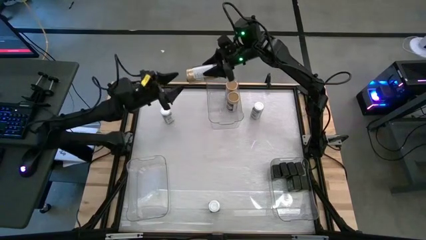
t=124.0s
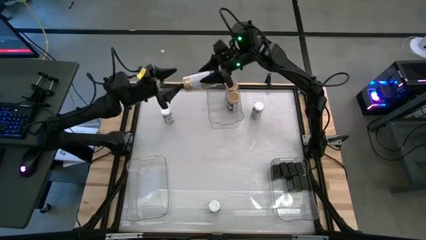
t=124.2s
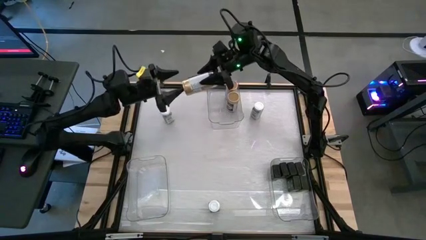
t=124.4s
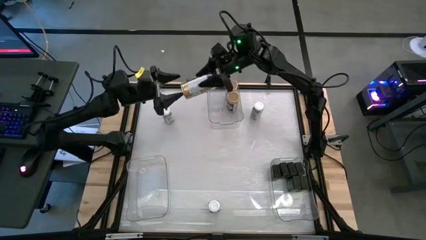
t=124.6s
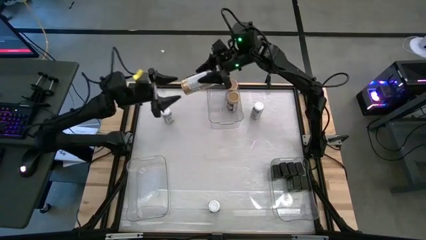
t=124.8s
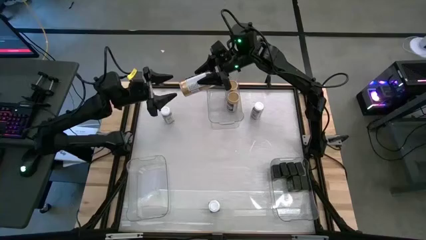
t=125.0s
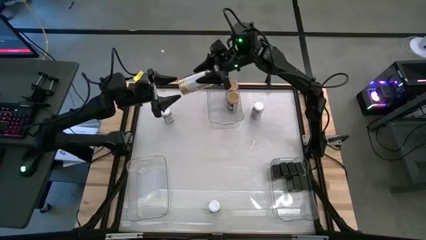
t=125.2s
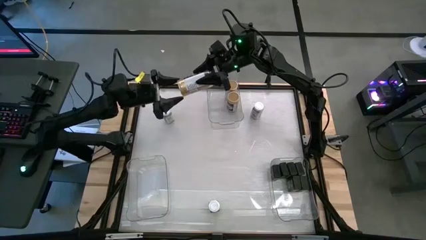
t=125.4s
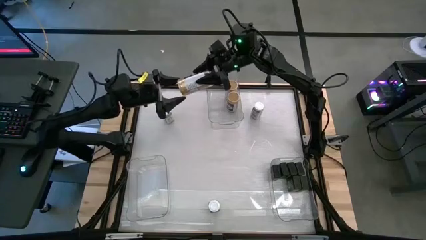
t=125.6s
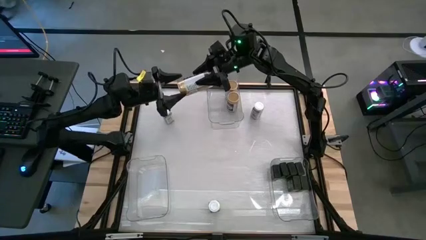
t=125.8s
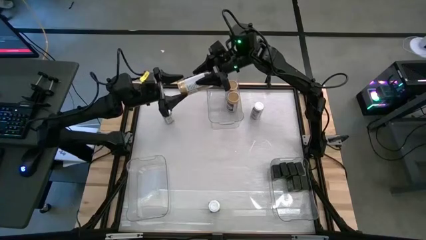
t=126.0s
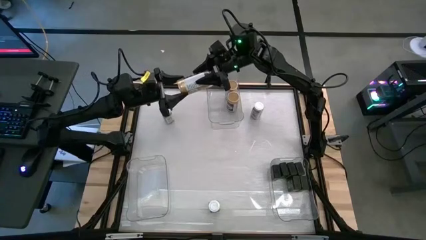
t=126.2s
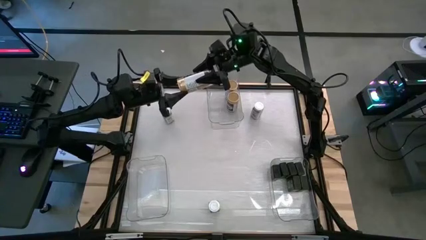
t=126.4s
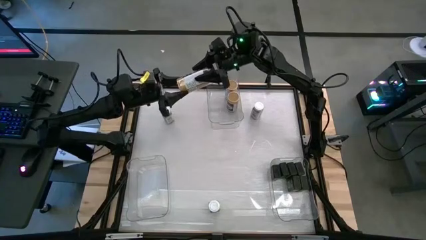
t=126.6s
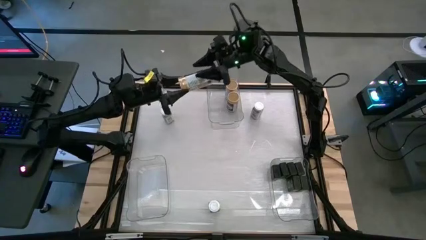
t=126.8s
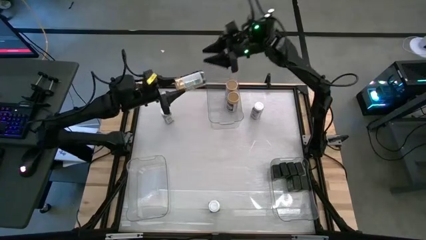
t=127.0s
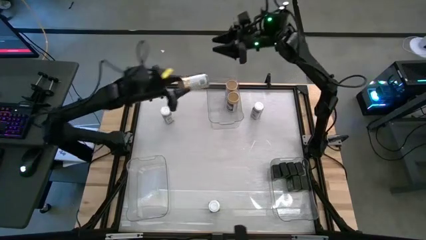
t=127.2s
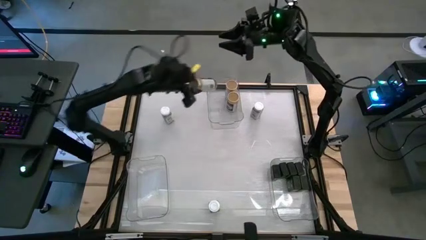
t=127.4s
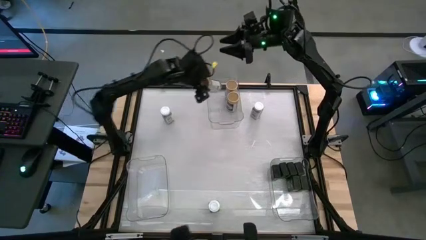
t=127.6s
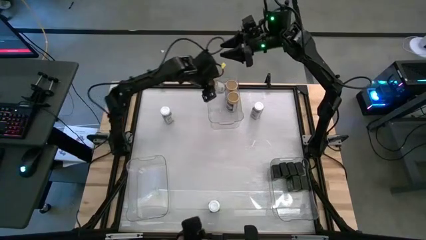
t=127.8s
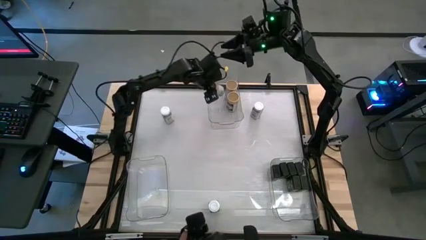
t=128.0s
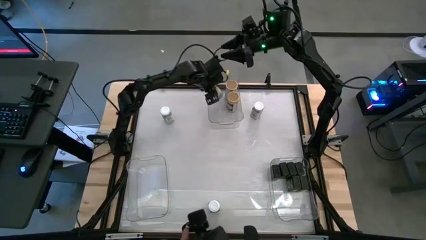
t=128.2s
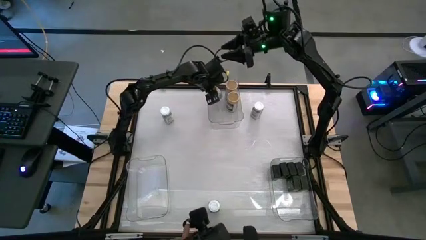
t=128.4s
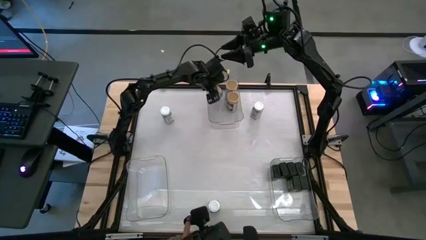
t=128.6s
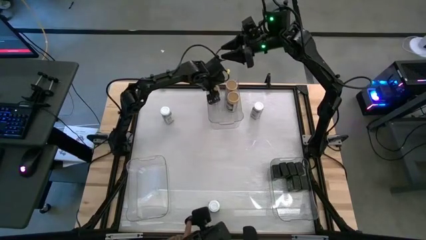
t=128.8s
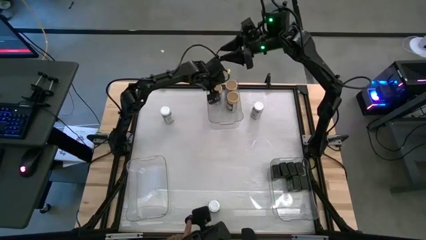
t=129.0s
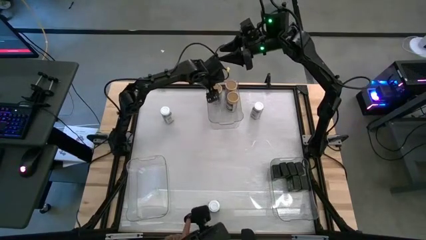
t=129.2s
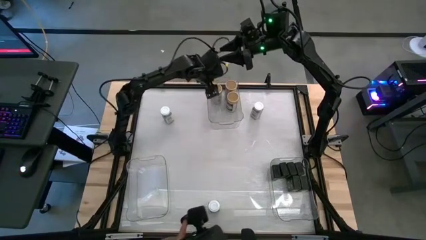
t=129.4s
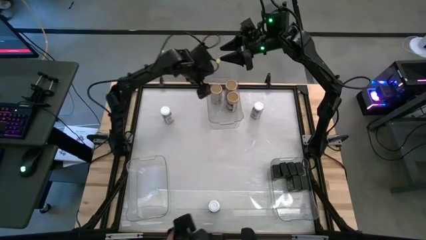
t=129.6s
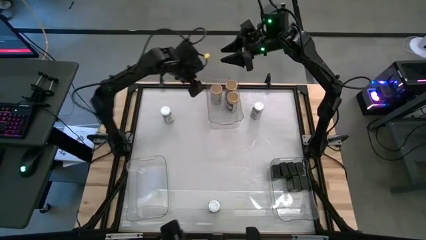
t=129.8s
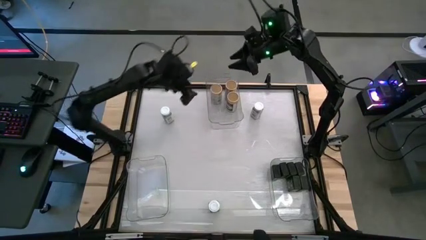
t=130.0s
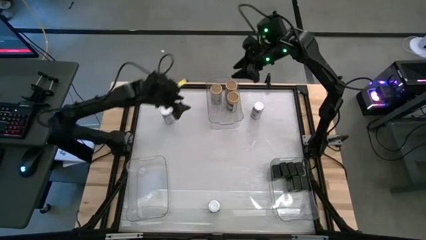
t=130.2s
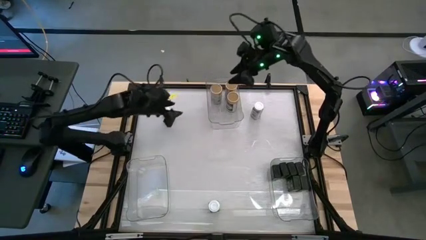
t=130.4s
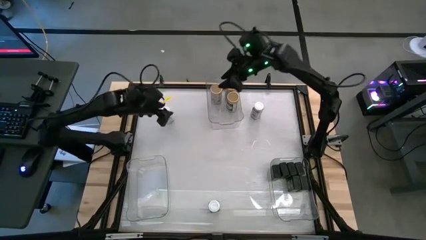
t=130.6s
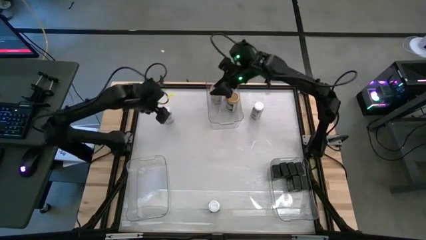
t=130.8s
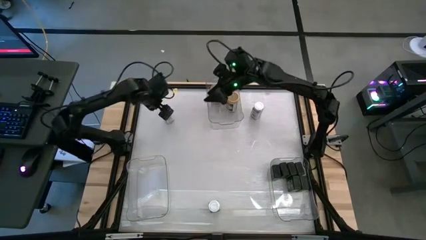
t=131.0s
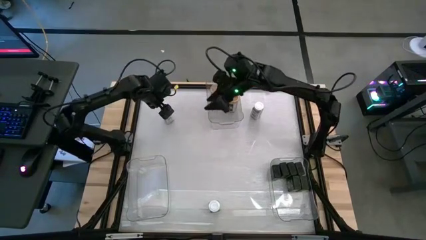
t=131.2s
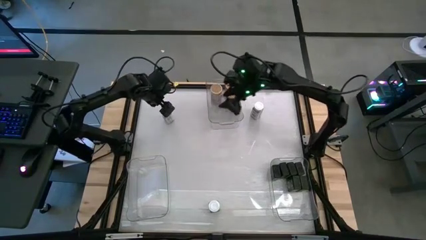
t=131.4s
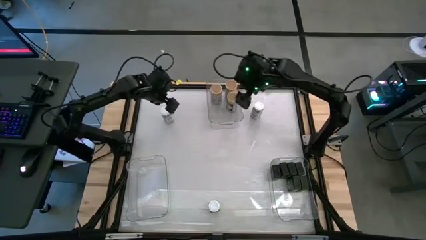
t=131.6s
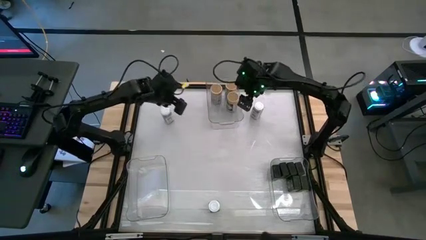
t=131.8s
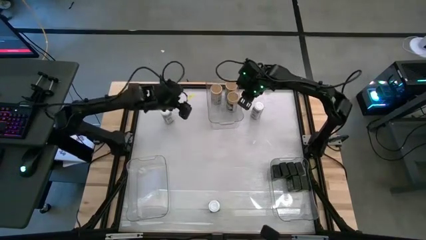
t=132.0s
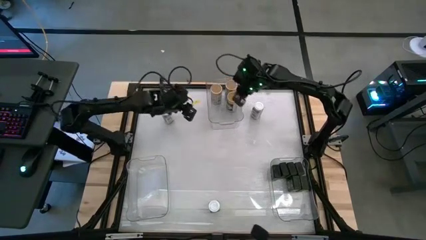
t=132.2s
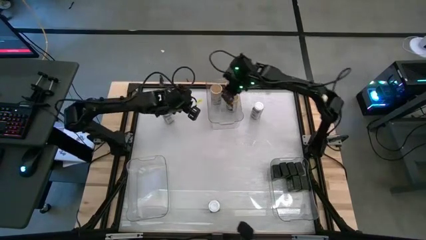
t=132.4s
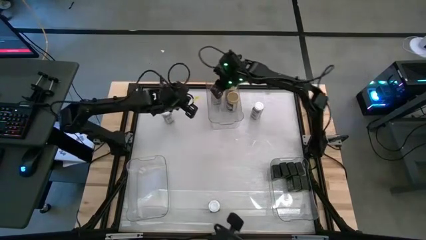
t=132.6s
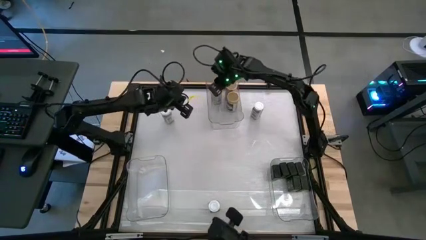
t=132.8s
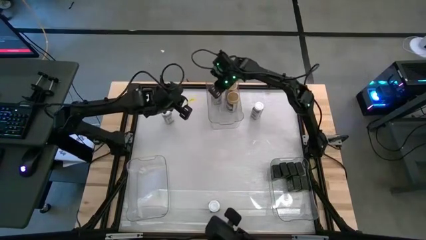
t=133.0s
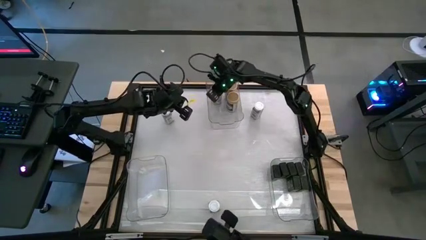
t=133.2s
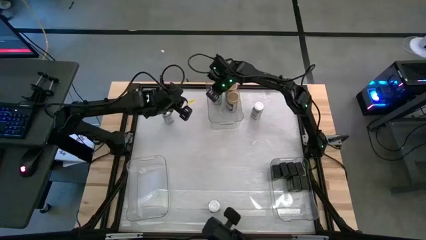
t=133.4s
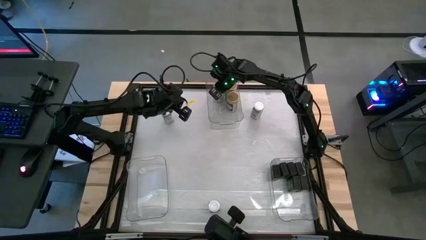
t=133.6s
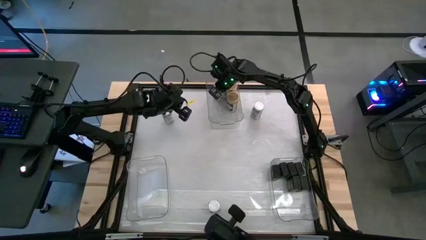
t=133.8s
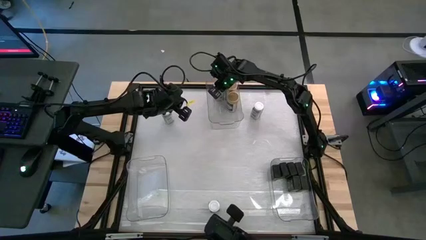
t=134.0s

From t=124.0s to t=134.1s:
Task: Sort spices by type
Put the gold spice bottle into the top transparent bin

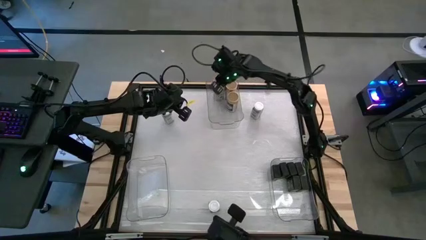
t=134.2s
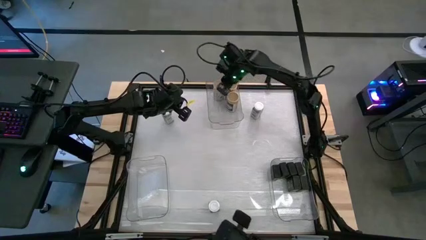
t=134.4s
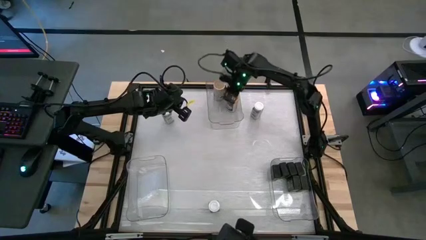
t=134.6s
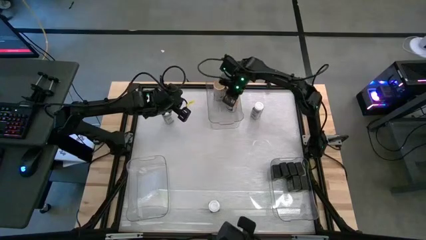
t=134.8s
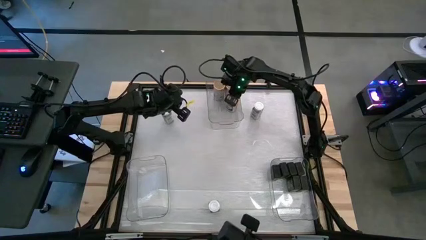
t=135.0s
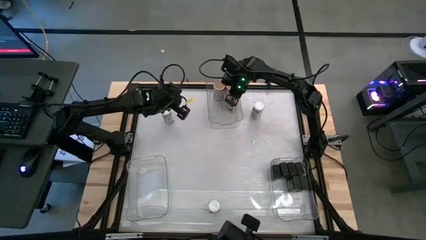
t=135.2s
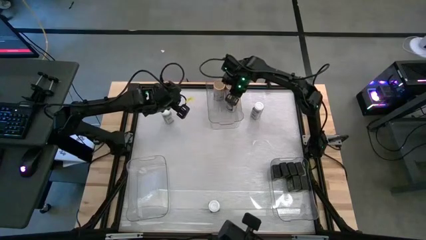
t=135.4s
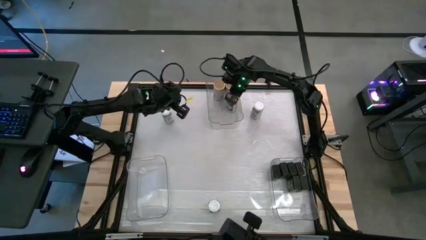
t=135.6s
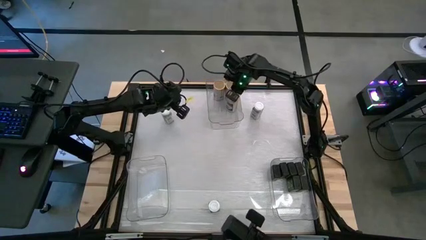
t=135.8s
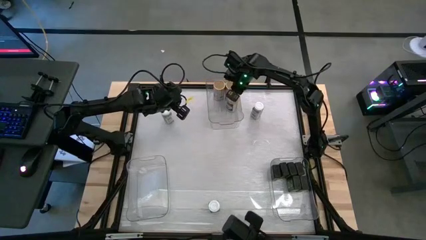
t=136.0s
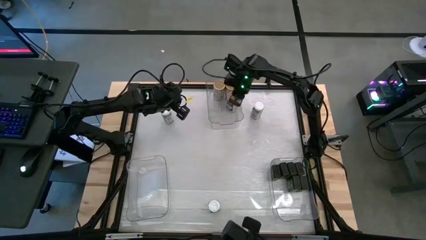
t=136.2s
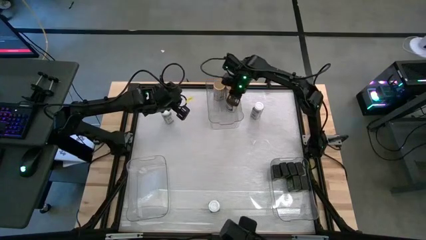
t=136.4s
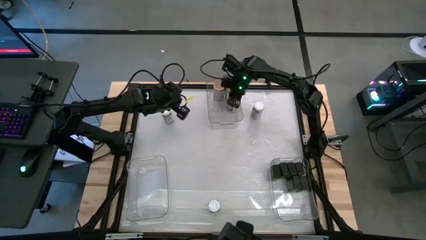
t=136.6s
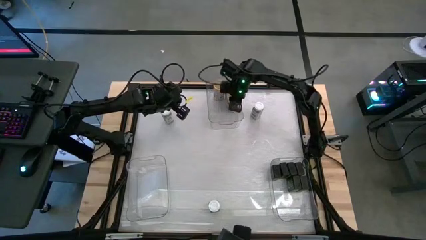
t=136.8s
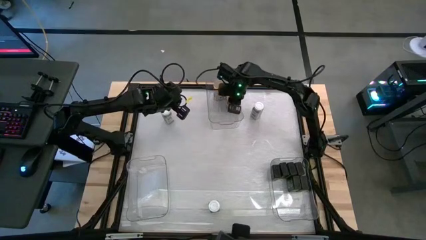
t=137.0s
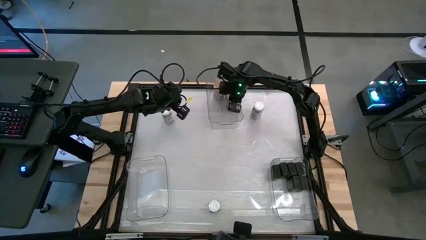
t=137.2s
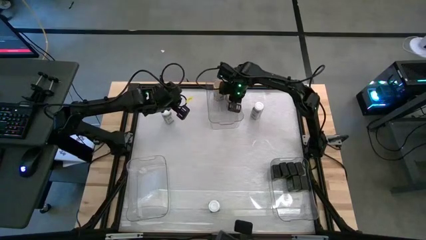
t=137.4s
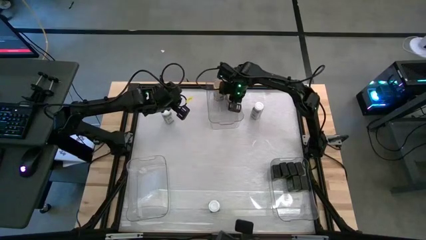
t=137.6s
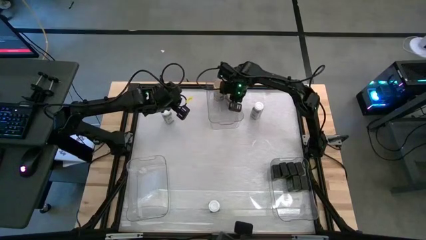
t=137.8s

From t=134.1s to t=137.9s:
Adjust the gold spice bottle in the top transparent bin

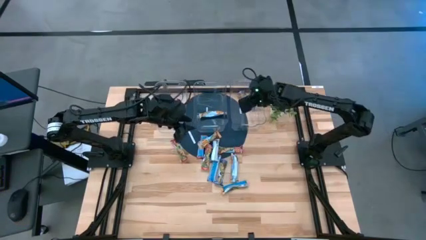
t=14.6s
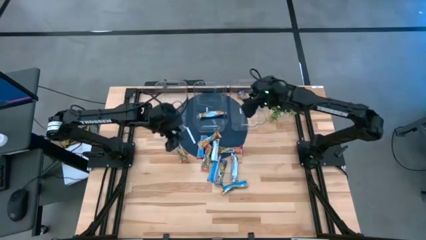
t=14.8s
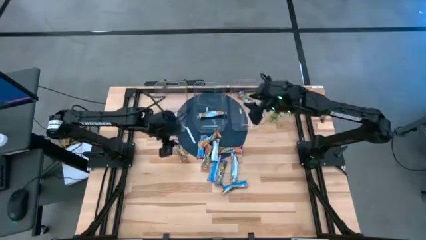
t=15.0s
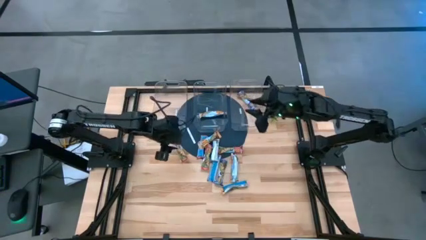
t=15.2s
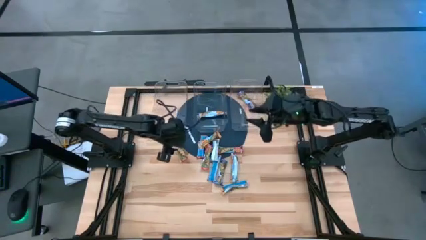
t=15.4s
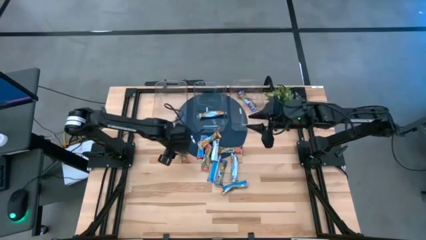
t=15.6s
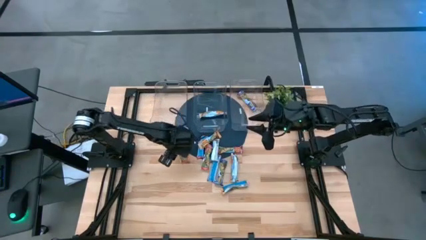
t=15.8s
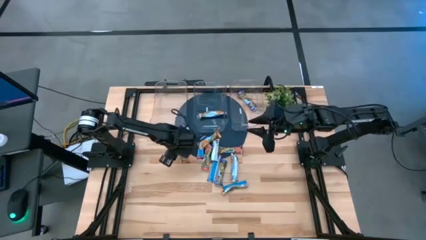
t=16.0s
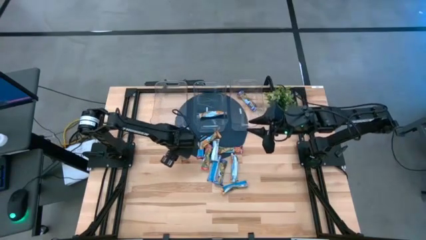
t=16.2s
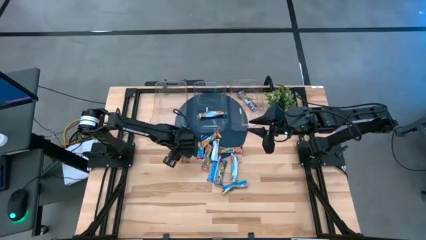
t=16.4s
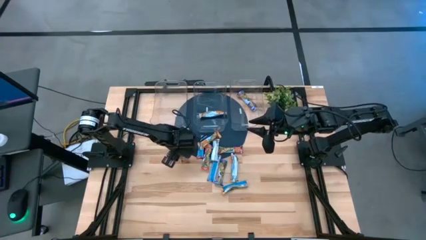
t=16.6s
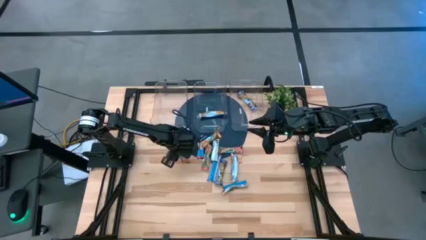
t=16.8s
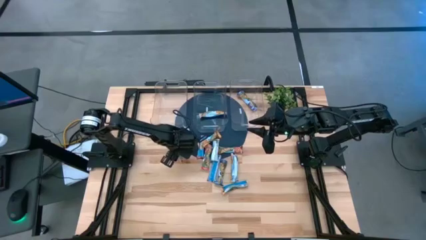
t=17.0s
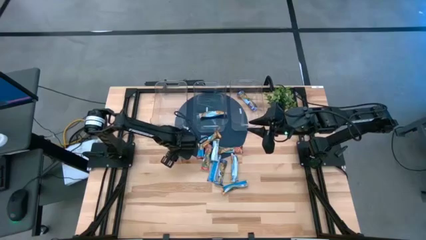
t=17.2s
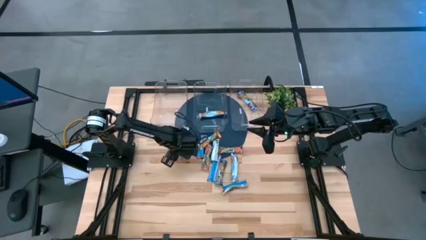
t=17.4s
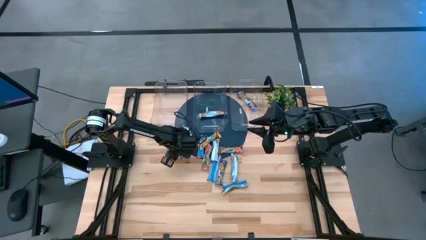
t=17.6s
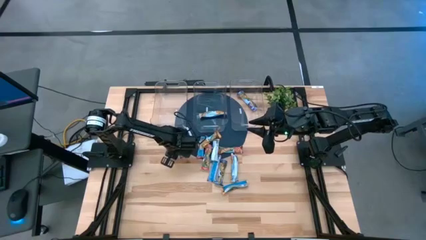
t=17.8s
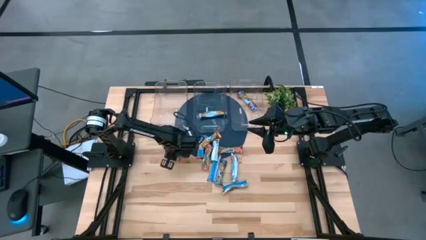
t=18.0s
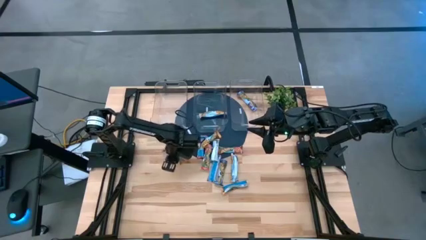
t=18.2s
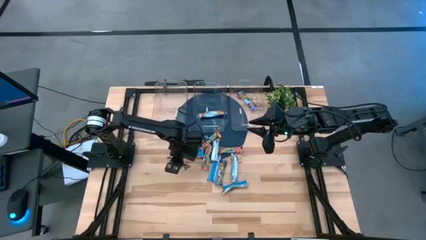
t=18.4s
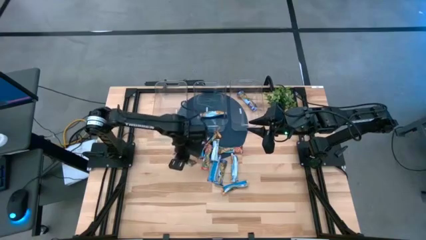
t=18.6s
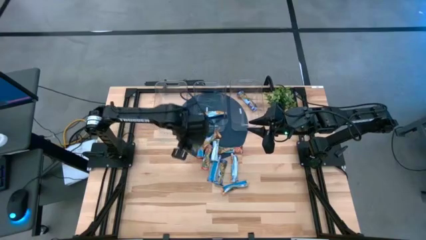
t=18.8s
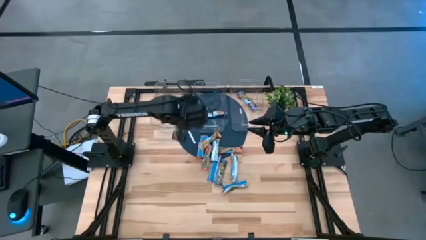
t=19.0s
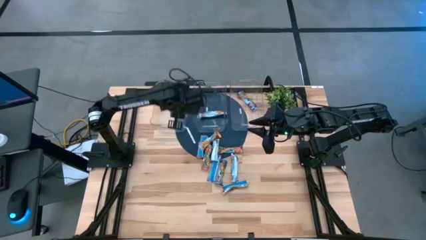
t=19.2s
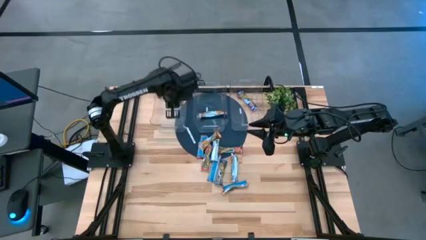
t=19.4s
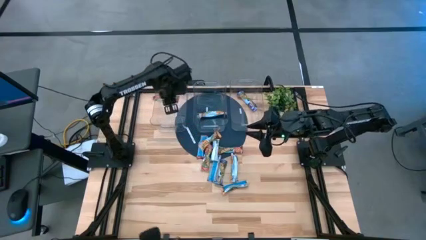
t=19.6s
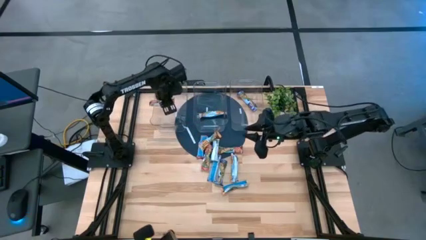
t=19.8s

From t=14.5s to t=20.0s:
Task: Pick and place Granola Bars by type
Put the red granola bar into the left transparent bin
